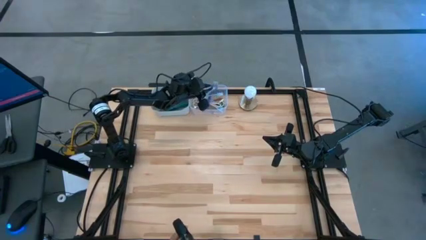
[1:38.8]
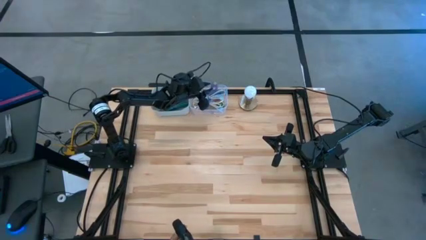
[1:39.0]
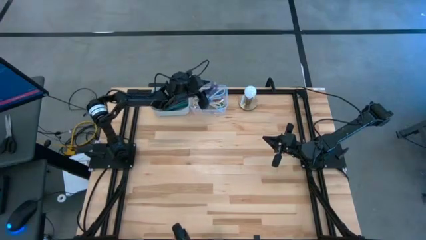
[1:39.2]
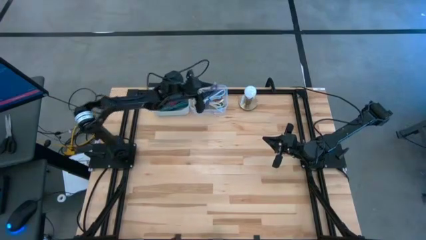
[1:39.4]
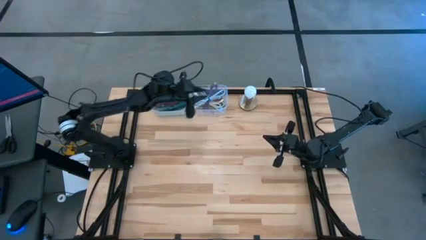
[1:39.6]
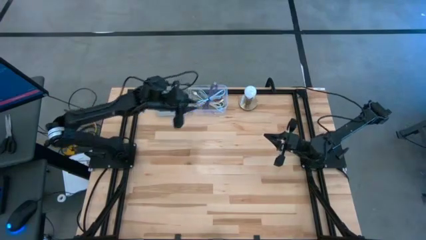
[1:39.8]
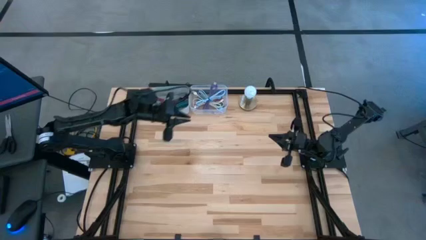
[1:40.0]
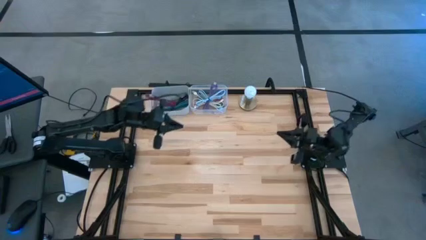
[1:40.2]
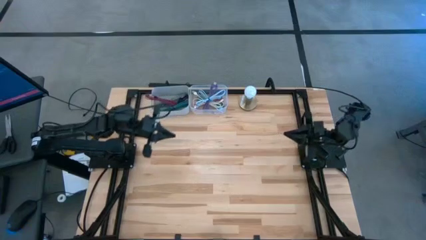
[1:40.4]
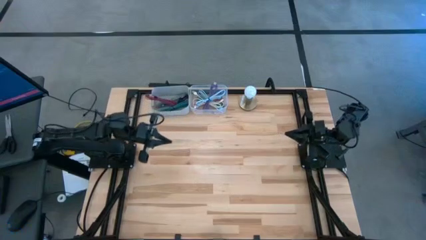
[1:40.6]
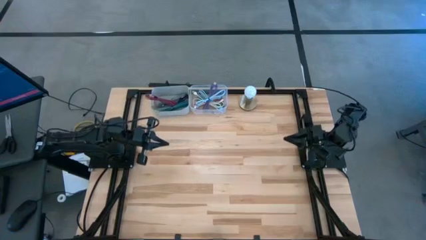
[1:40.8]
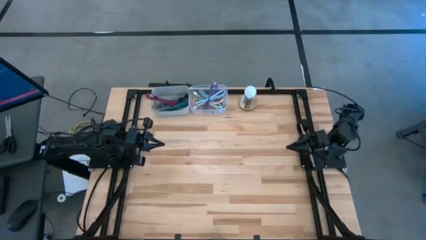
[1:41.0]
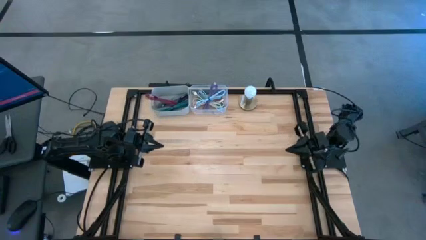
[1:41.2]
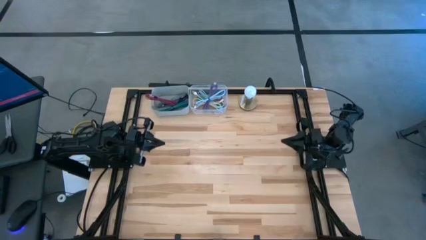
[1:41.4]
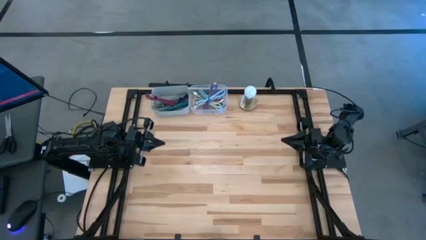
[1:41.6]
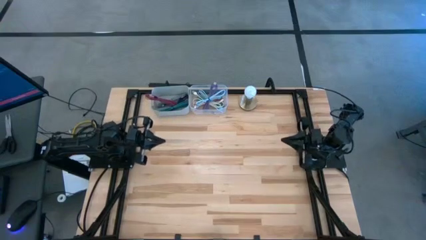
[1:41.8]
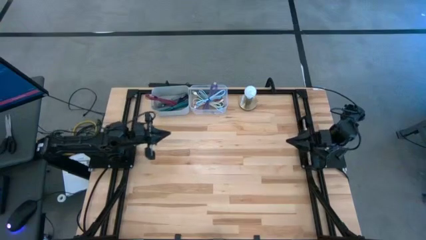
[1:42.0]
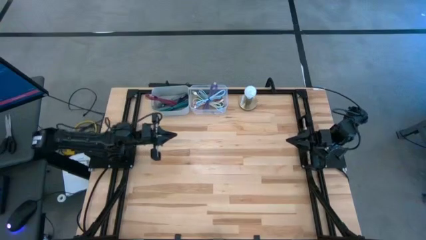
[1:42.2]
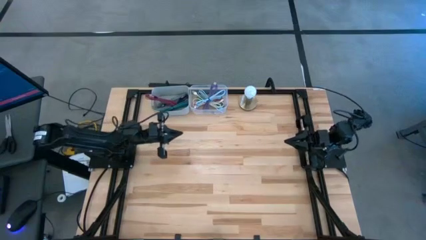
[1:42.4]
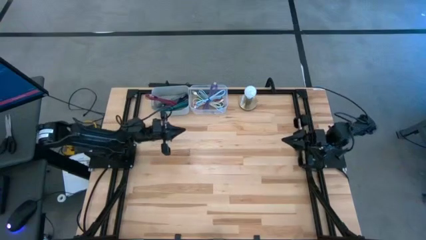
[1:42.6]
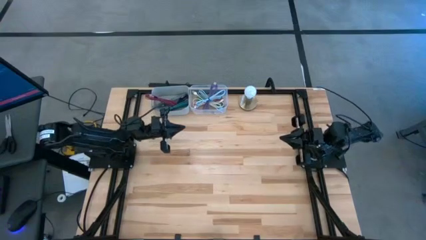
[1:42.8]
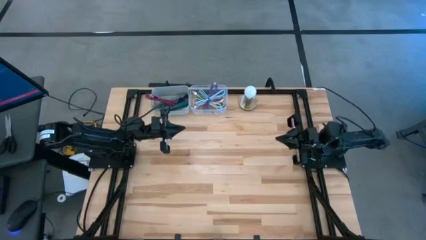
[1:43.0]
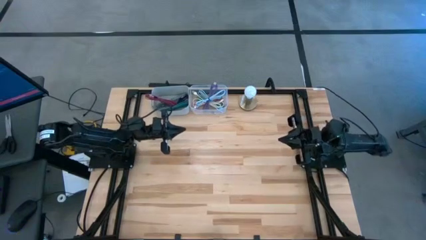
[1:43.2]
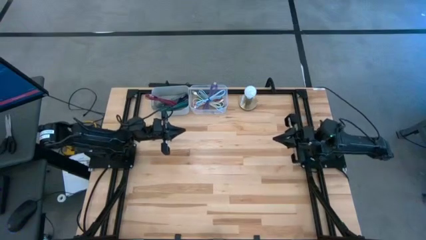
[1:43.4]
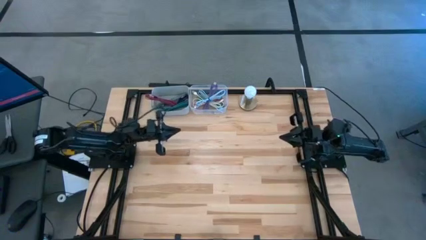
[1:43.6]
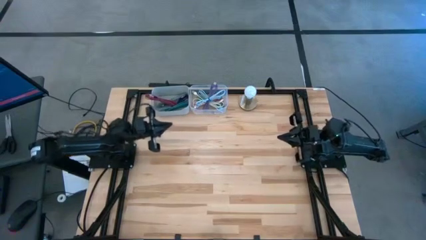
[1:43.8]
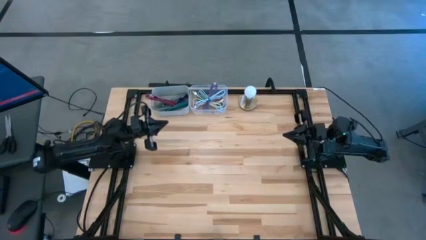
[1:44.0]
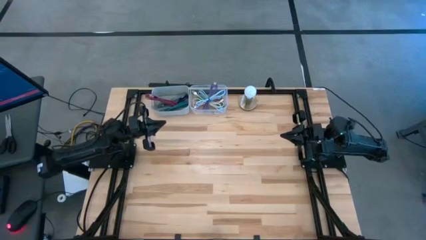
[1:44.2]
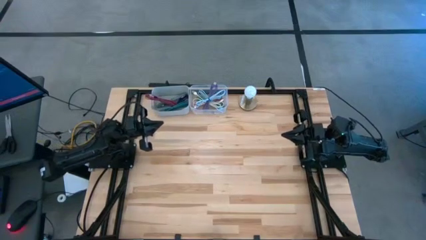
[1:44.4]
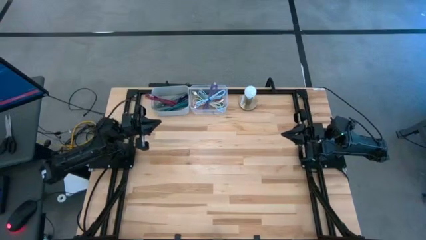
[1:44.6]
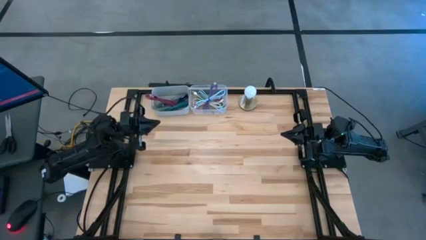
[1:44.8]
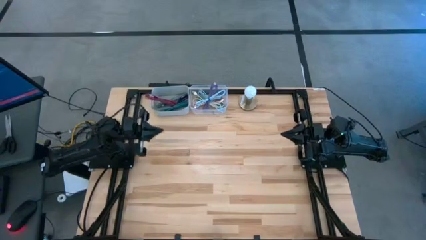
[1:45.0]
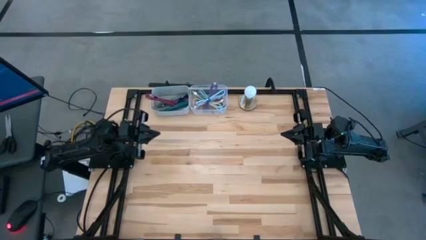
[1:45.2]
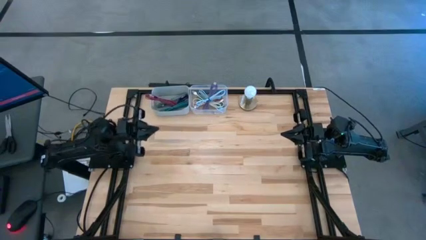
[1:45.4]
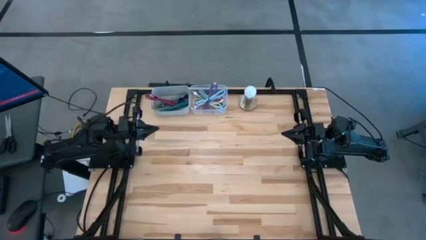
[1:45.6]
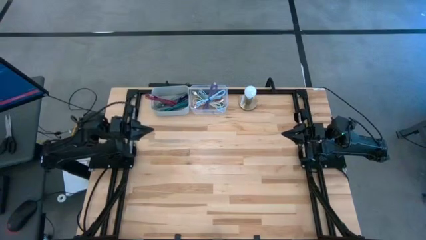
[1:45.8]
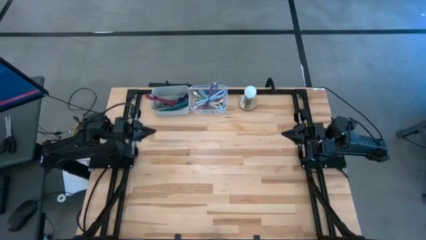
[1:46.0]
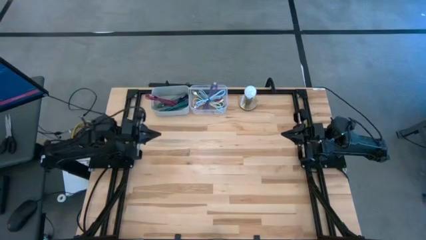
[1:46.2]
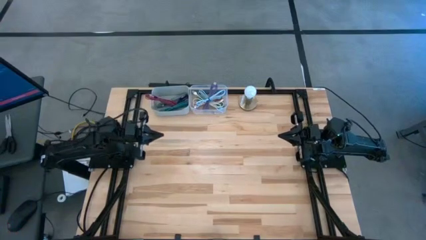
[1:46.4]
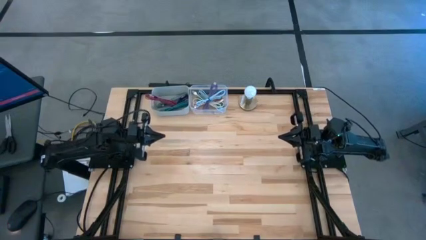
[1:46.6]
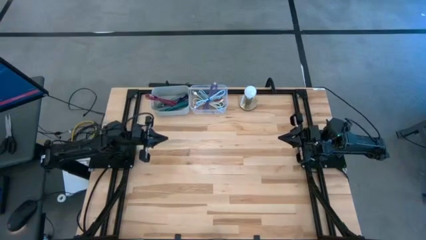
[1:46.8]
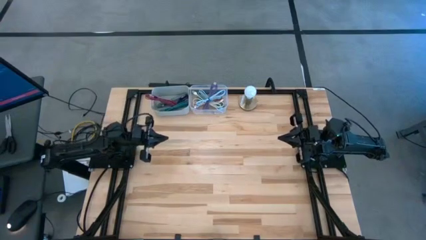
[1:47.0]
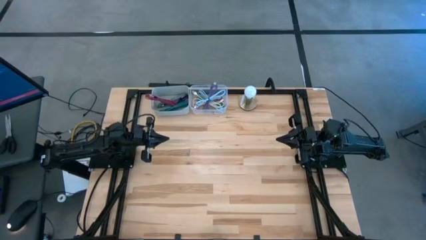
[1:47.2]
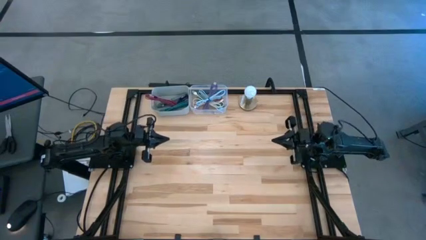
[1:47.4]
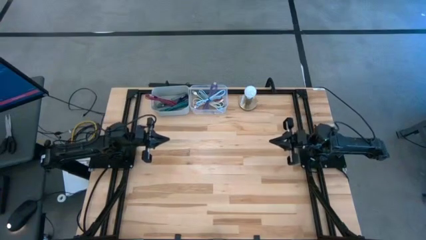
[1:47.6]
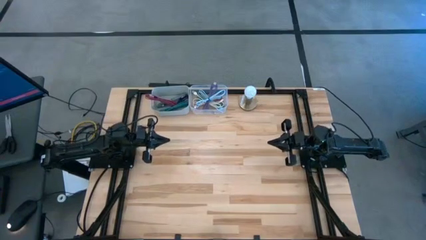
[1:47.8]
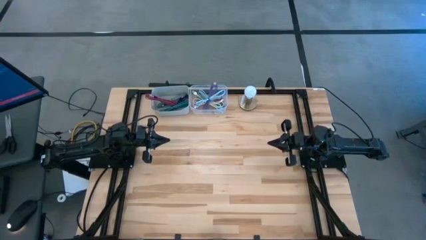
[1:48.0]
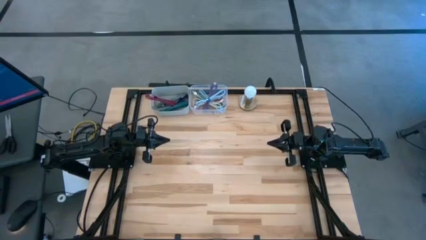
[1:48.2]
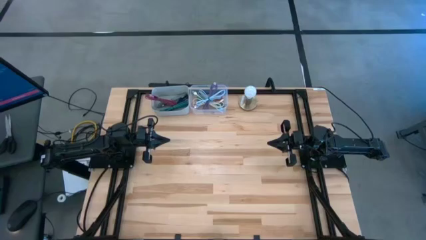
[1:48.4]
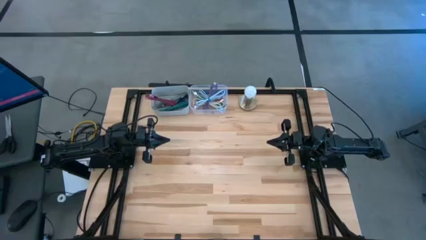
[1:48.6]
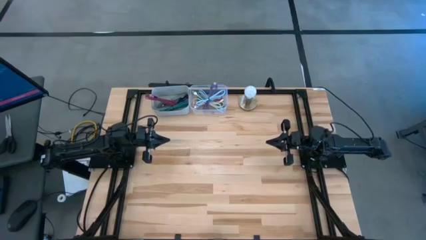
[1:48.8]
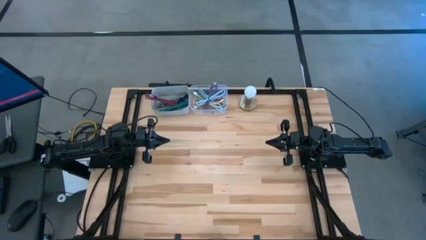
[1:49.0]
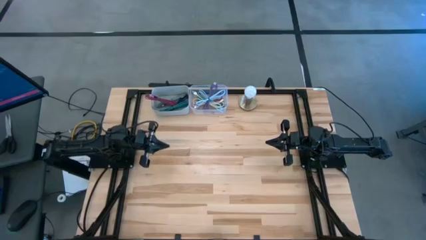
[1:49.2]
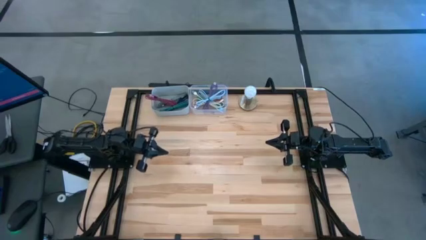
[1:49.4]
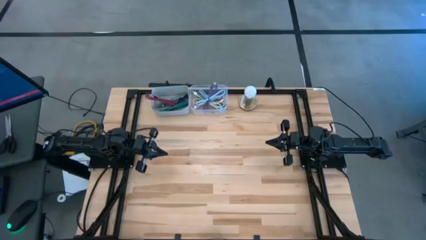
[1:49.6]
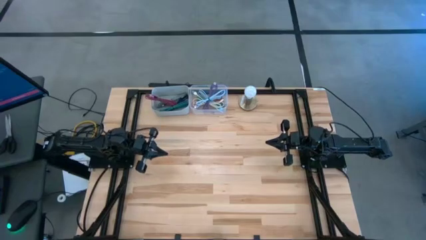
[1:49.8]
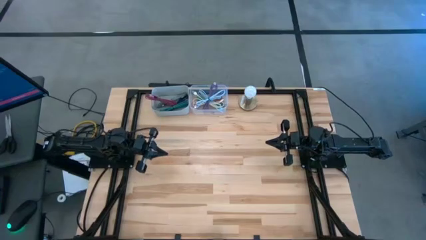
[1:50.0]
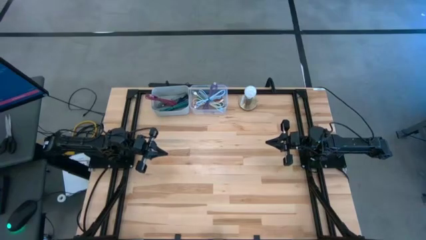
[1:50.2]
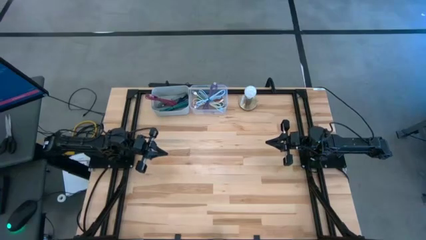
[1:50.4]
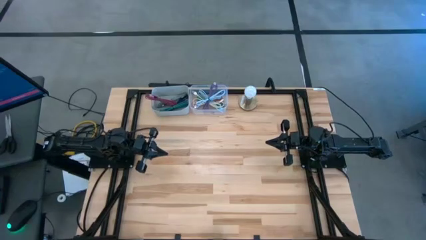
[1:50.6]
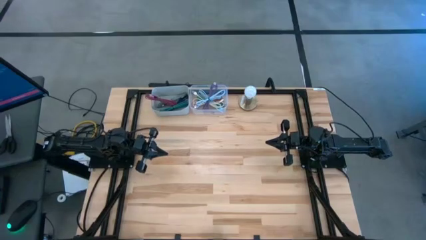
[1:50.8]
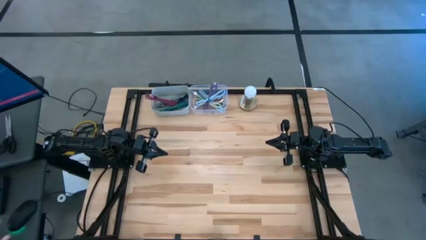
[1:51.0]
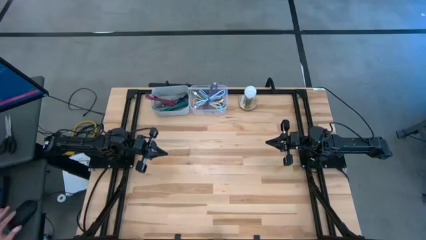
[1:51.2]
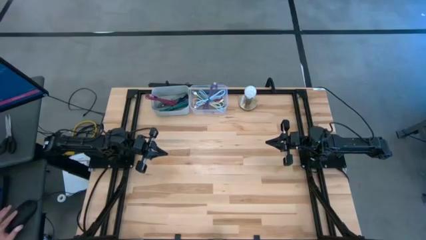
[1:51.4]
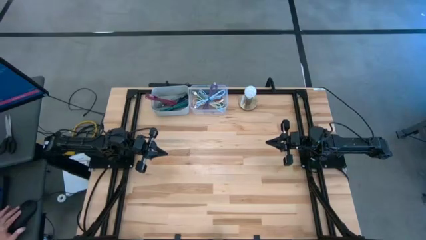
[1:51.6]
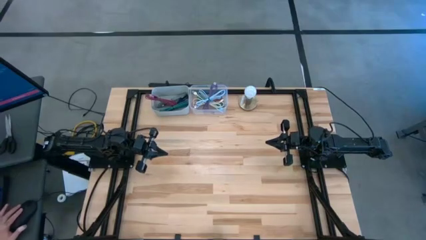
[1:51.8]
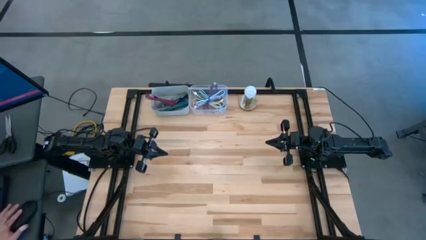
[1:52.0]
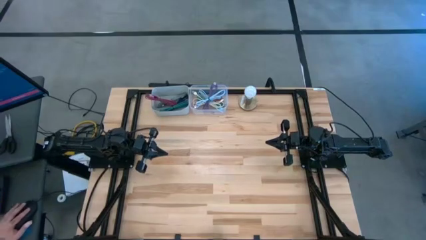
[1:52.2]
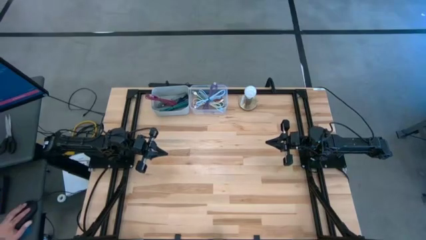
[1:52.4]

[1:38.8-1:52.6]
Task: Pick & Place USB Port
Return to Home Position

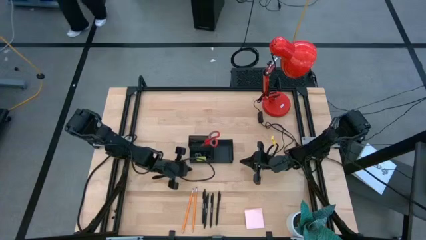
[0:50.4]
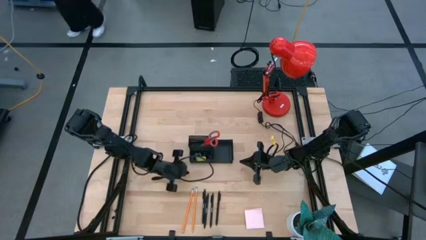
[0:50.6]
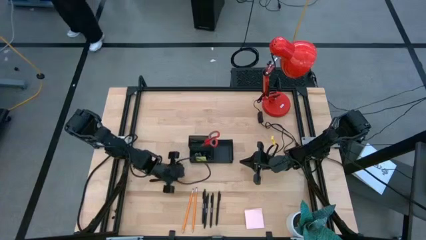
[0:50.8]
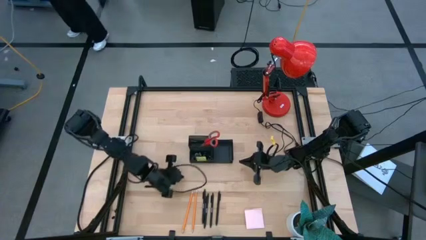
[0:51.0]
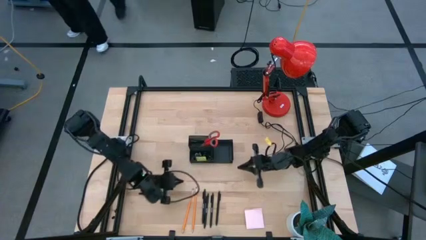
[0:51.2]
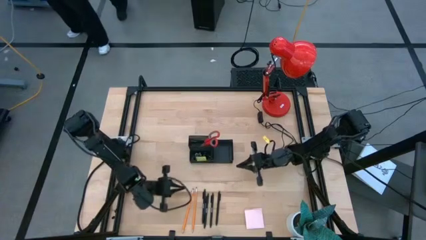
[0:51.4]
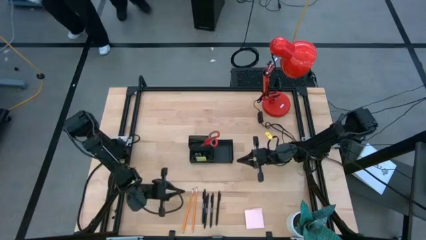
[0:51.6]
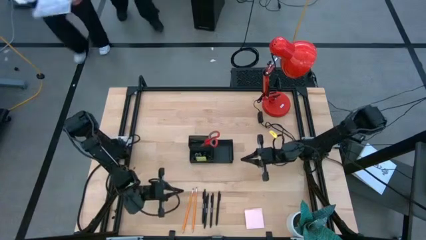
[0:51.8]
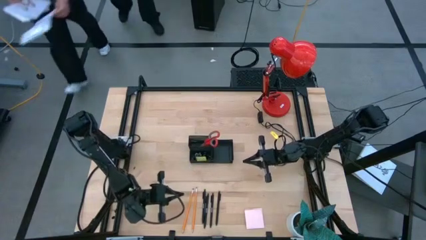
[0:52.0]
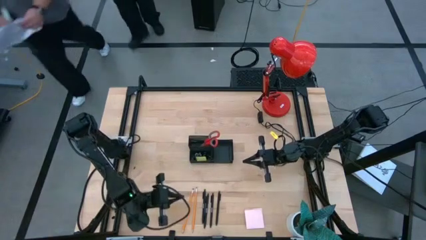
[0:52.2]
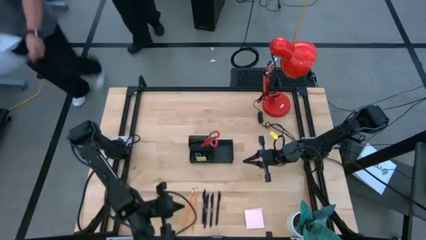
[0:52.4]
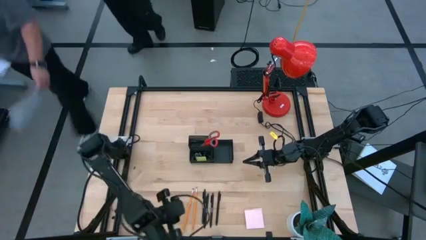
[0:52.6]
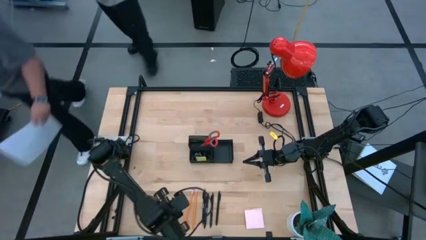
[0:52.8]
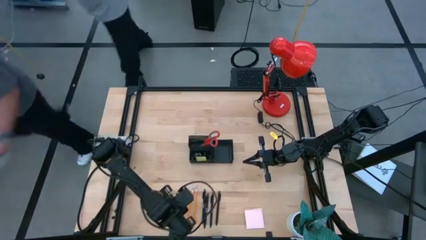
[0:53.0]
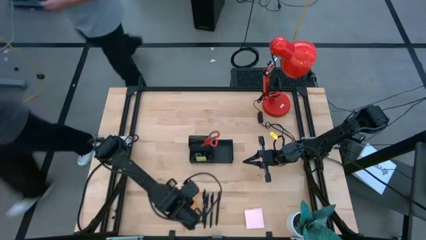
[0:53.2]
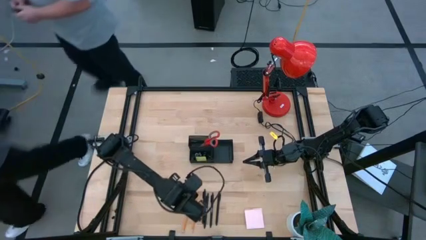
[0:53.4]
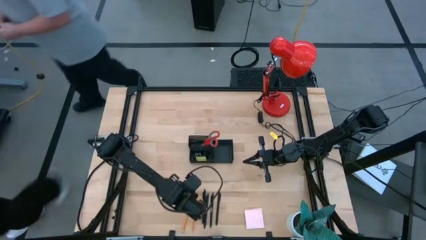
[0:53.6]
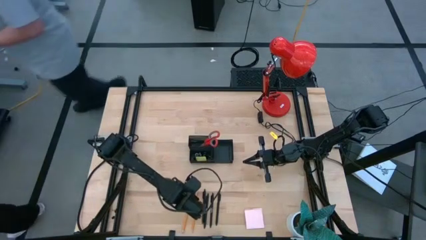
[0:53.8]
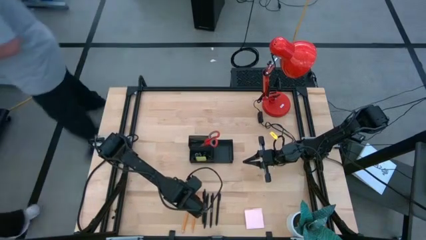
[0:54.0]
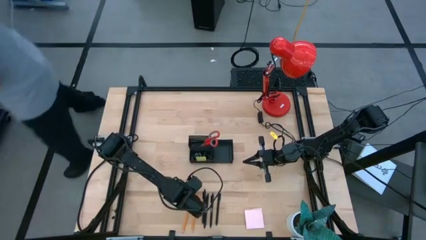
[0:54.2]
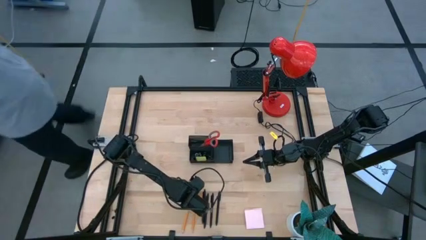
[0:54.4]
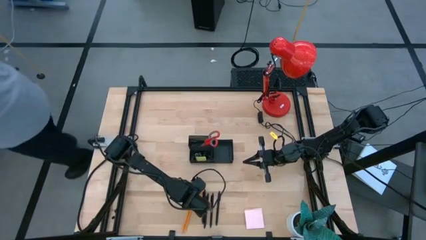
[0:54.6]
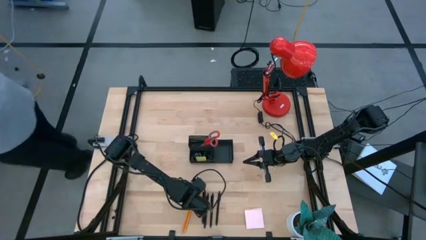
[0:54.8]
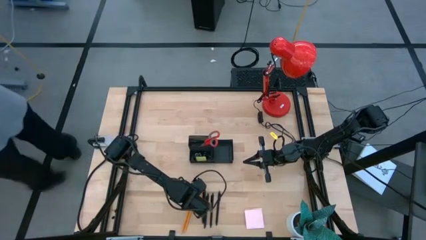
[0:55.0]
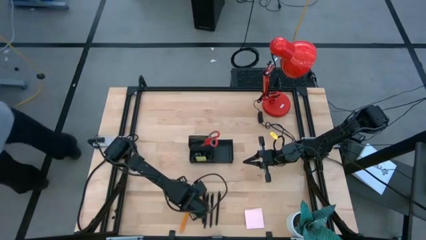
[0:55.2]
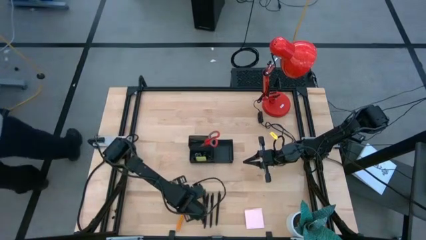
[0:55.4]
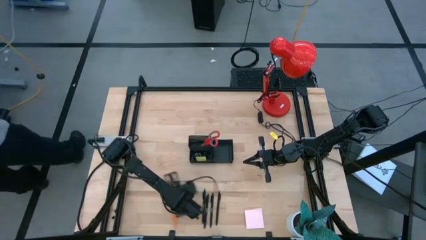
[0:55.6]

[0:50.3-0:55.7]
Task: Pick and place office supplies into organizer
Put the orange pencil into the black desk organizer
